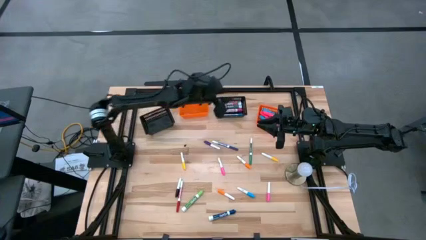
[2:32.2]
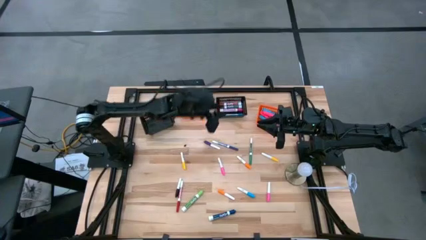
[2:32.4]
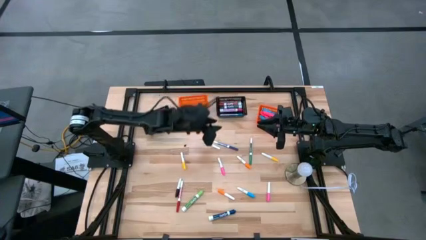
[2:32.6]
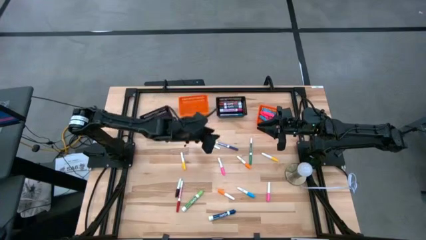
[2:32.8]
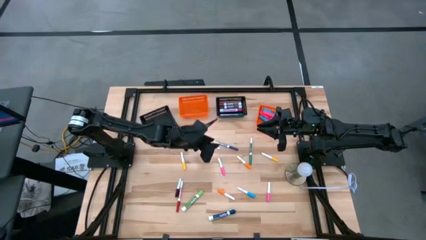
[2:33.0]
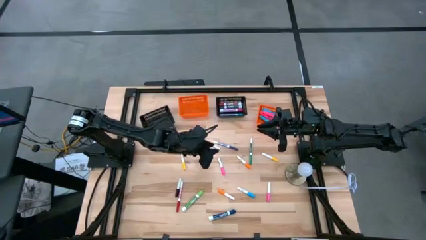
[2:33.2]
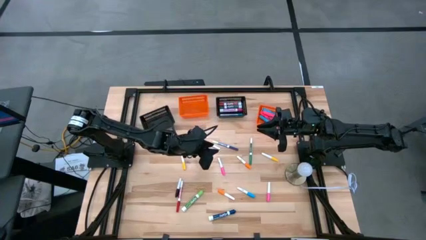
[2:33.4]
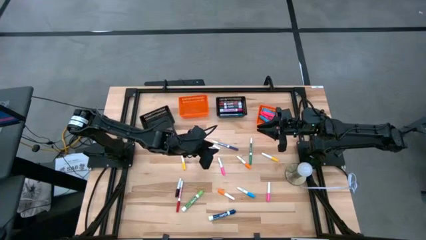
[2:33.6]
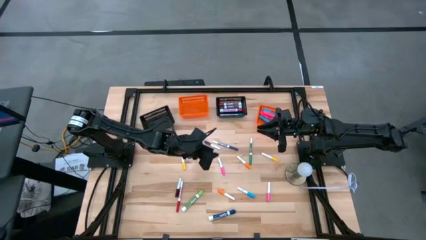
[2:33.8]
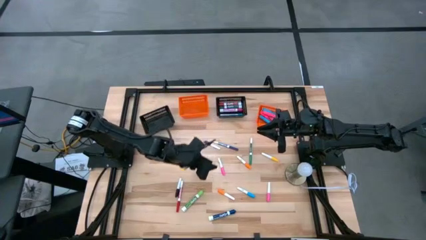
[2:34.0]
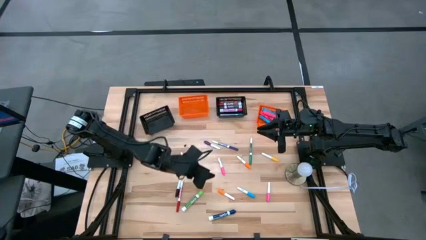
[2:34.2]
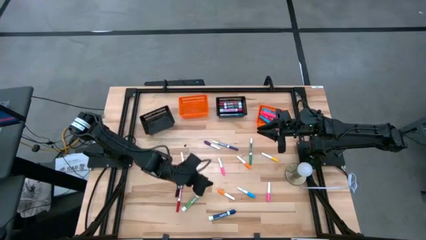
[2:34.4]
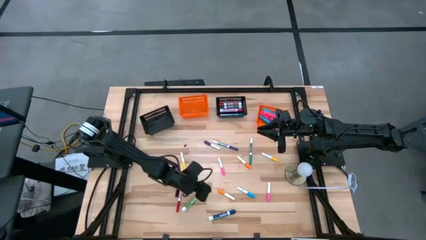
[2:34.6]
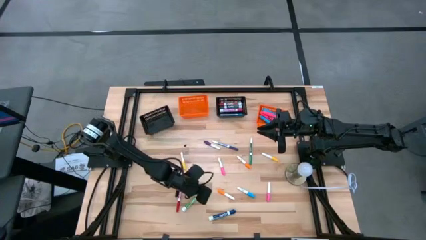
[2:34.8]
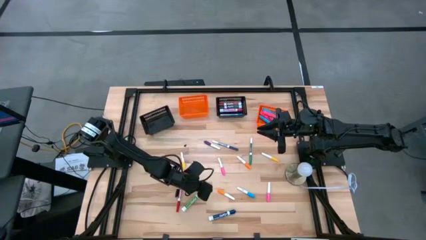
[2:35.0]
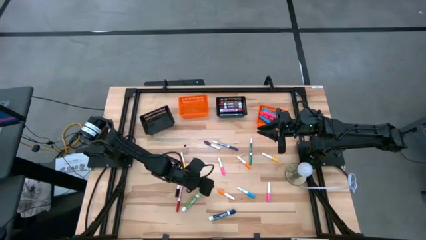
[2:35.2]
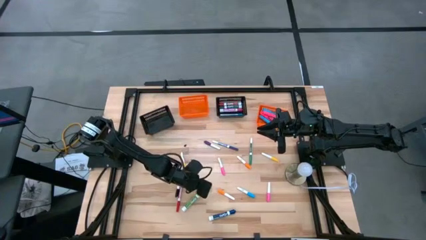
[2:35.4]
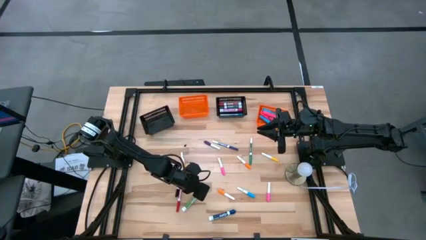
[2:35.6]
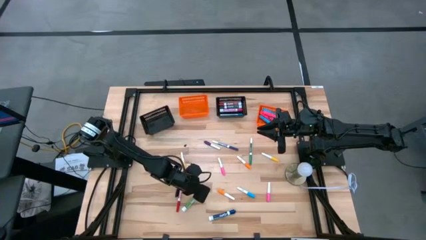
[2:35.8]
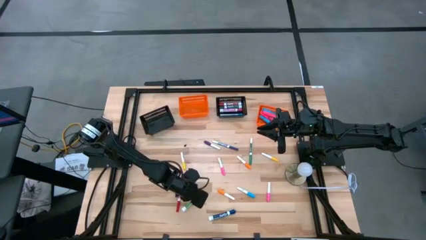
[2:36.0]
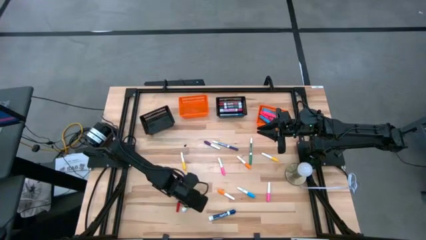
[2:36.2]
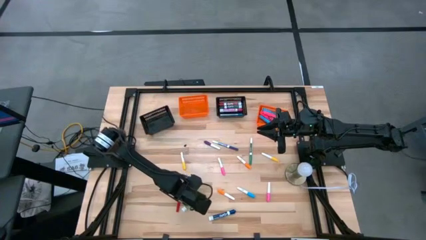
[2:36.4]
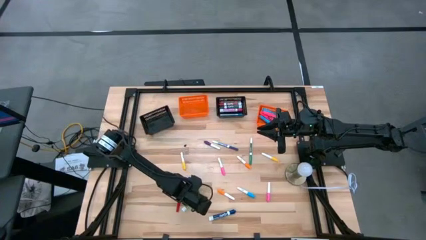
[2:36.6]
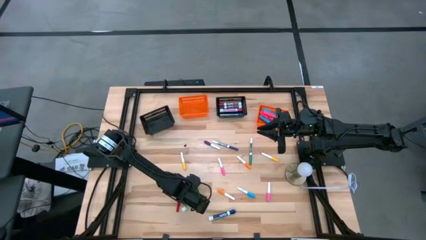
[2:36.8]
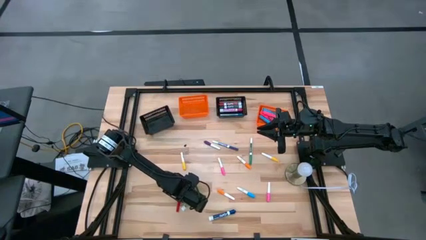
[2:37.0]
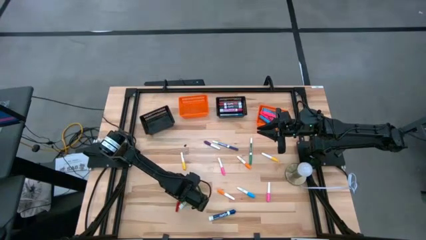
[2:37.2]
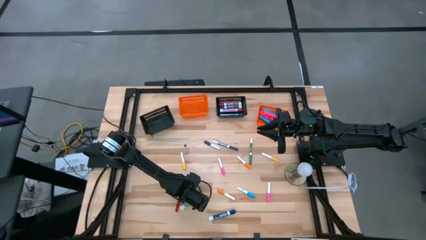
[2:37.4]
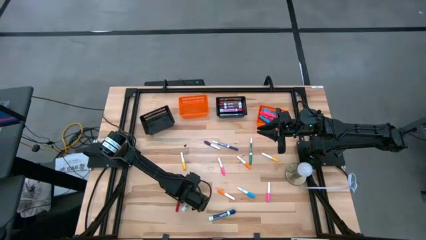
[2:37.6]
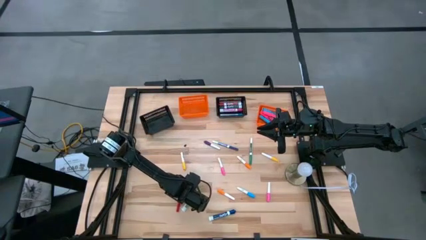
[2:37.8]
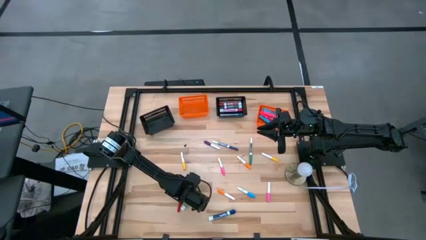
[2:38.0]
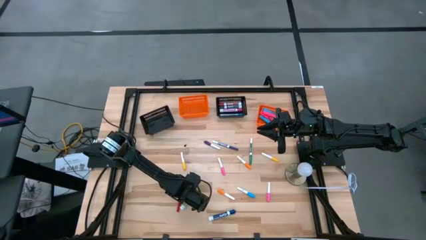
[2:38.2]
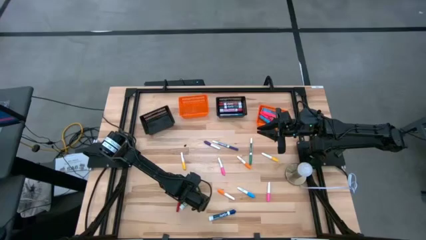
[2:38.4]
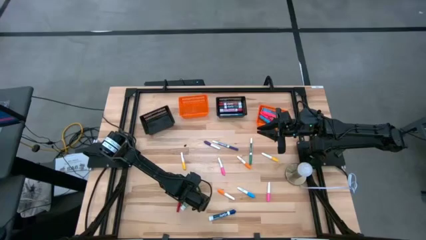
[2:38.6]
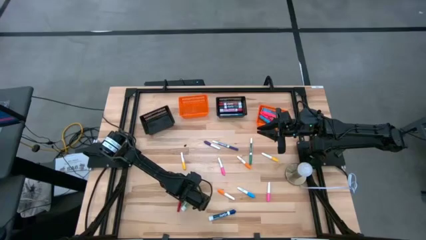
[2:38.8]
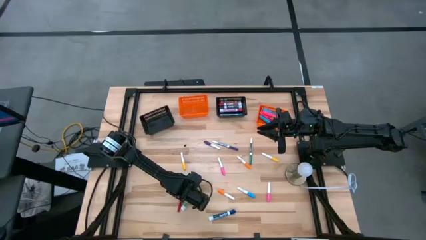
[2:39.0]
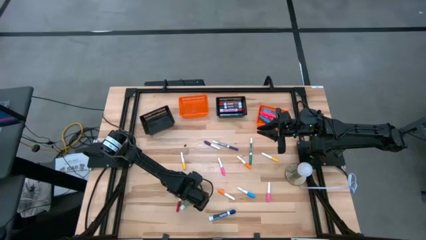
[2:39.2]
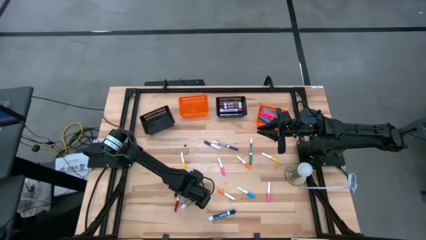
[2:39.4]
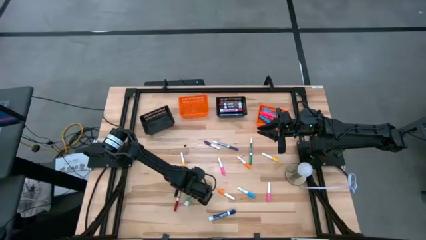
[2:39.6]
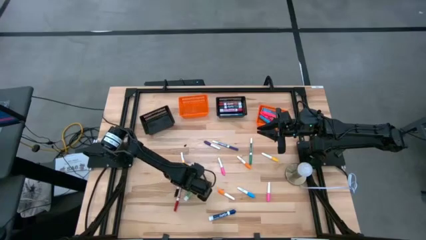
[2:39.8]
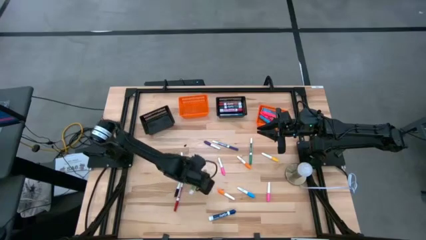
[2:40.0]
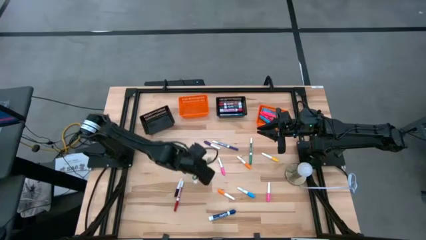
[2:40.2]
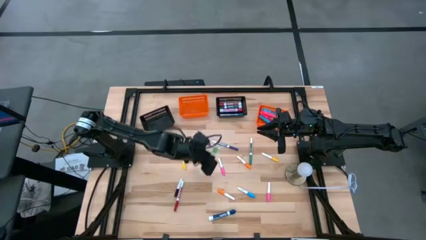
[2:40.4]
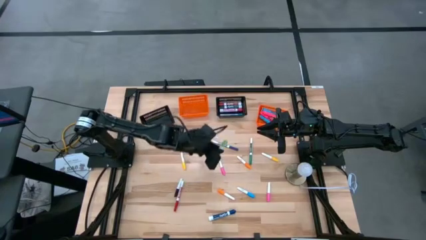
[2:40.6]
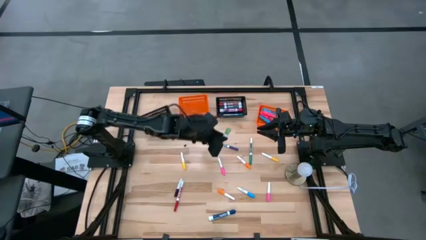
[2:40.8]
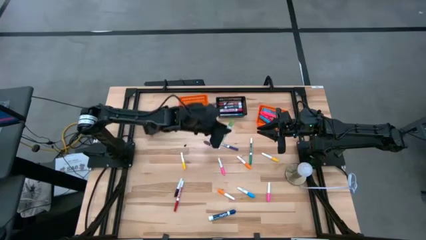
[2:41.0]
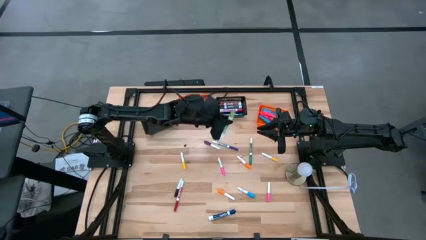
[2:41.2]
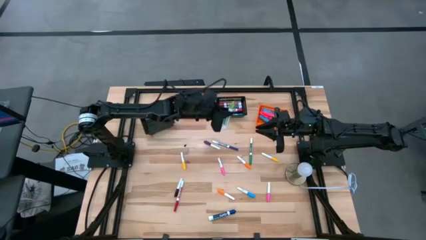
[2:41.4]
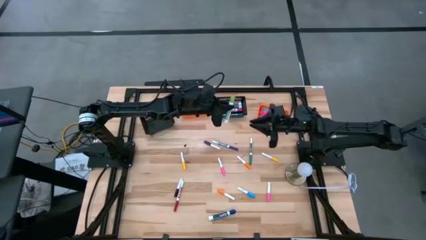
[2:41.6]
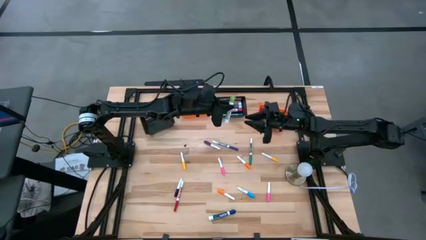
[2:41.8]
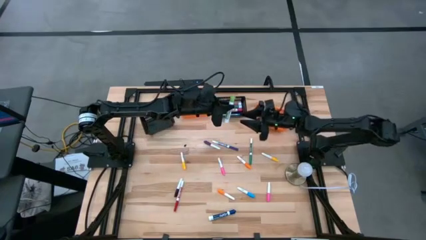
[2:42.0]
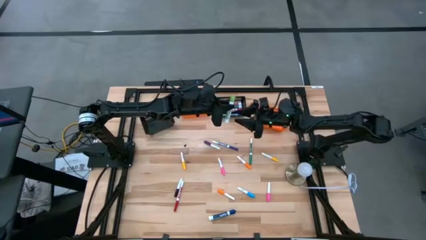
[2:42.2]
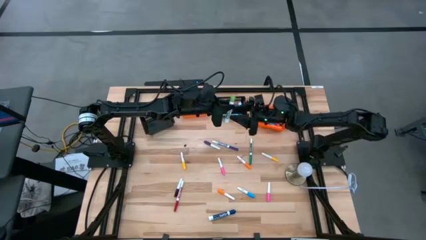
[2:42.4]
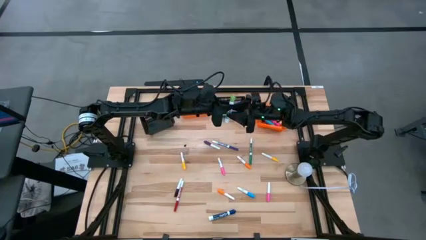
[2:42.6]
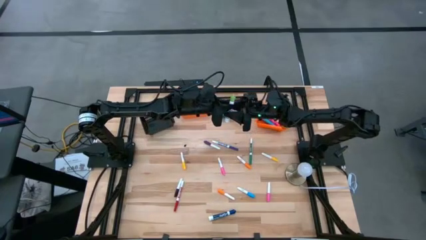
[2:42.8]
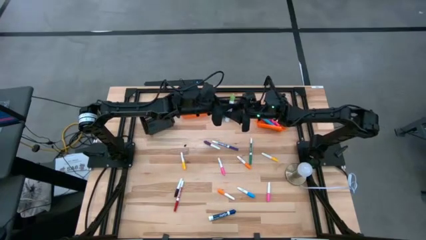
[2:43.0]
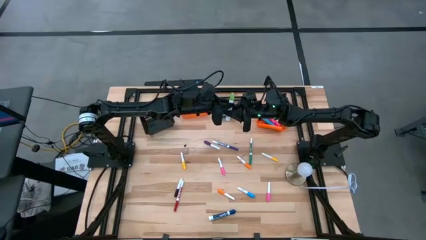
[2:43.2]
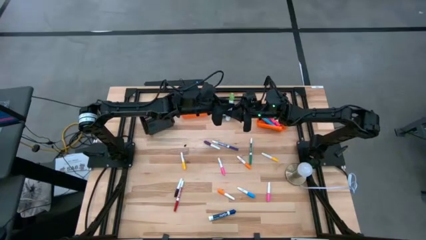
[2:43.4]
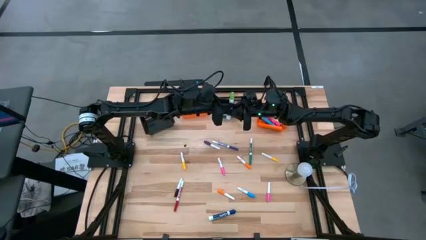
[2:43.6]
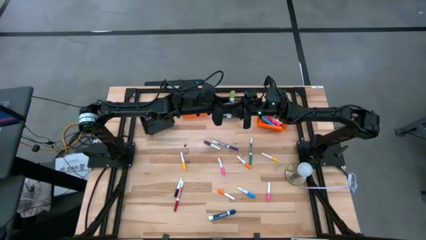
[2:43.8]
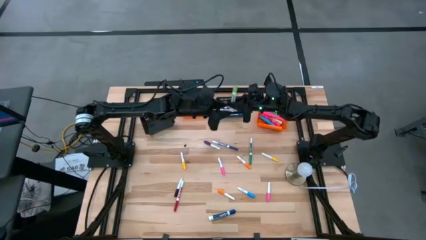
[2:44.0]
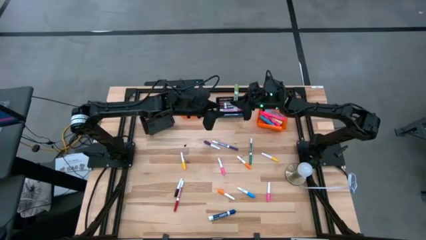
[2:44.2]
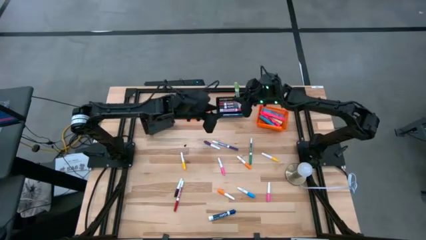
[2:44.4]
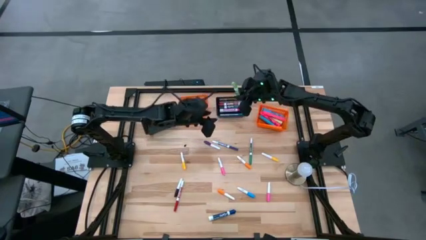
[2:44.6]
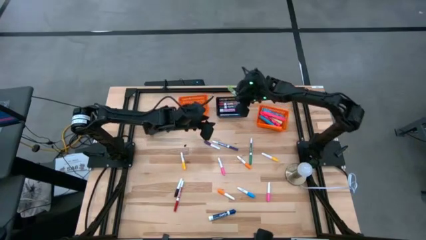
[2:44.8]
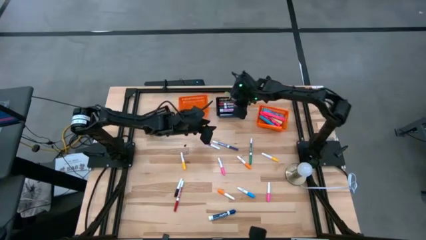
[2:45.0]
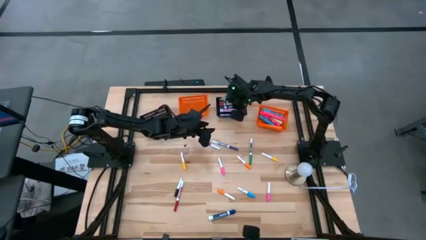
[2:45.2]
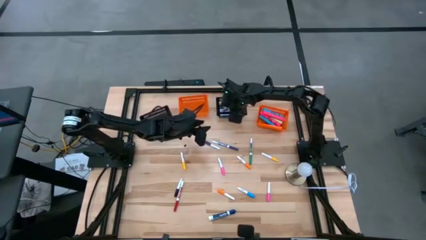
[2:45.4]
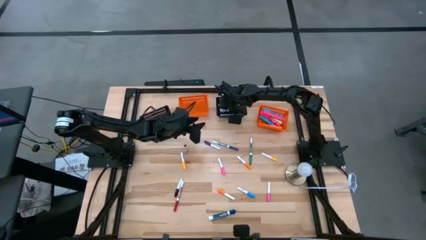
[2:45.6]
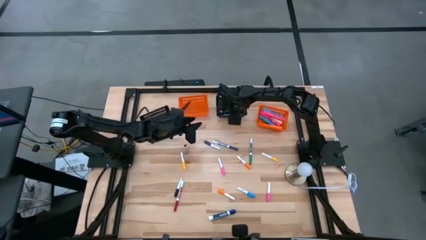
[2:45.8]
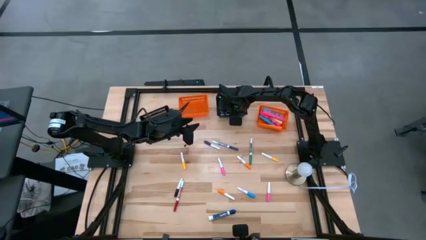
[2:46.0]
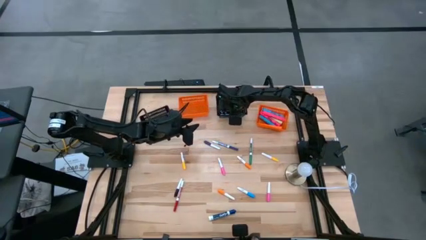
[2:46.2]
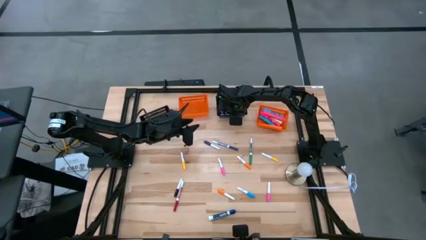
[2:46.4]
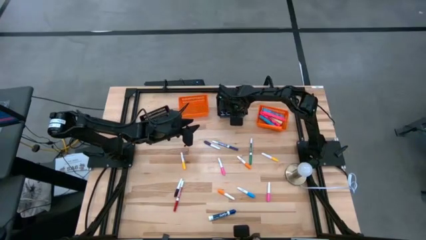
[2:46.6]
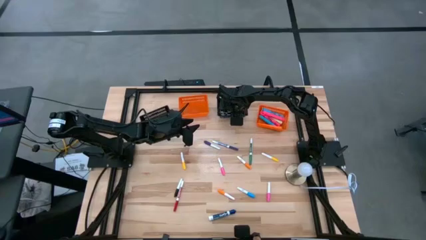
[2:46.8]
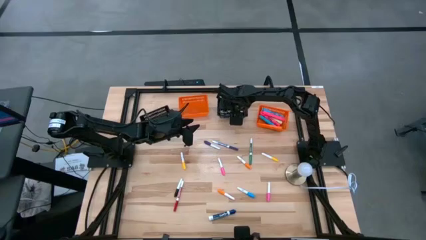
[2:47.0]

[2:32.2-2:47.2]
Task: Pick & Place Markers
Put the white light green marker into the middle black bin

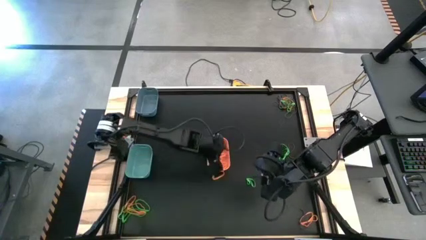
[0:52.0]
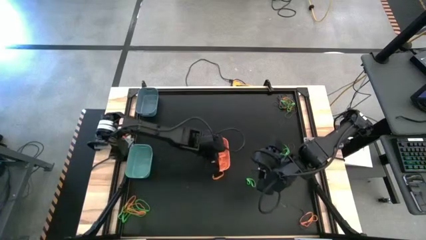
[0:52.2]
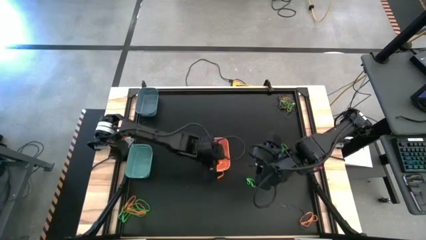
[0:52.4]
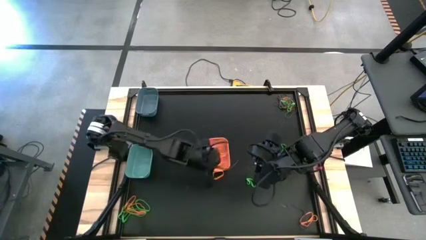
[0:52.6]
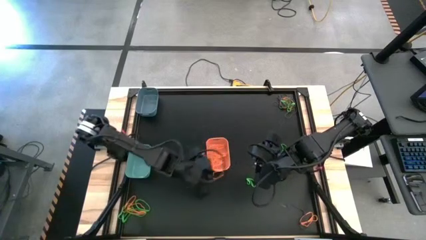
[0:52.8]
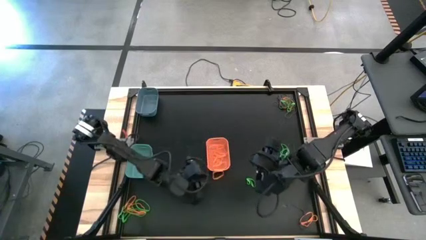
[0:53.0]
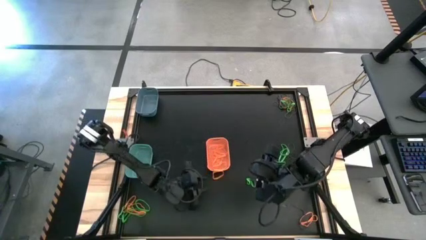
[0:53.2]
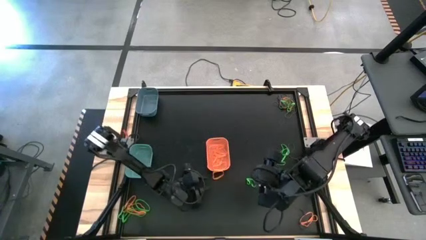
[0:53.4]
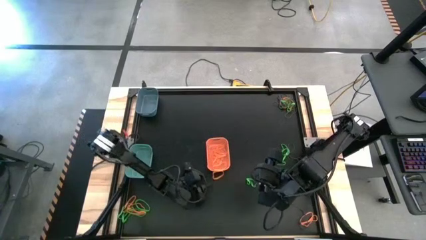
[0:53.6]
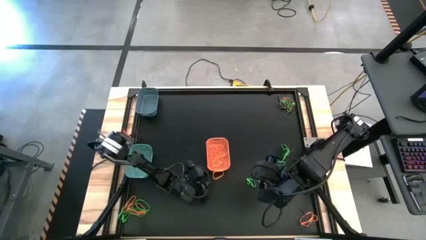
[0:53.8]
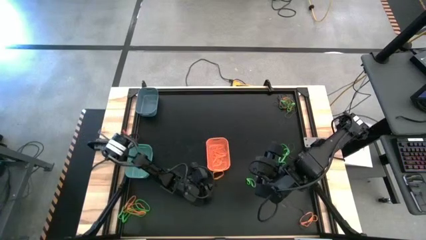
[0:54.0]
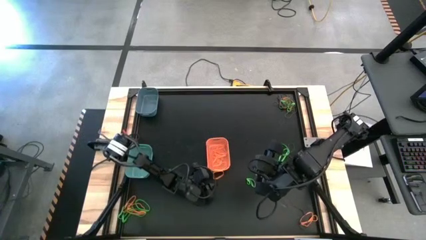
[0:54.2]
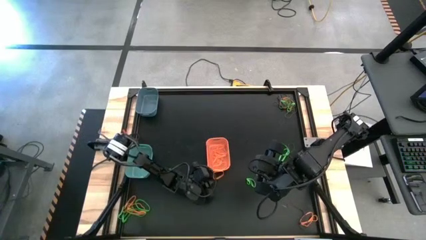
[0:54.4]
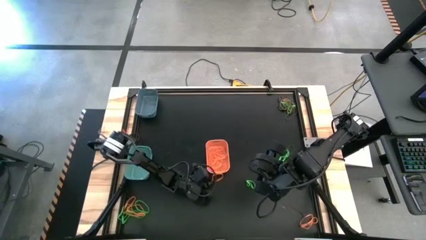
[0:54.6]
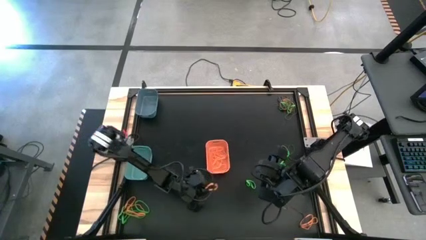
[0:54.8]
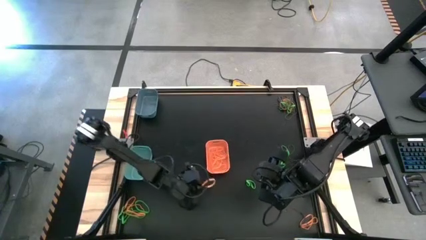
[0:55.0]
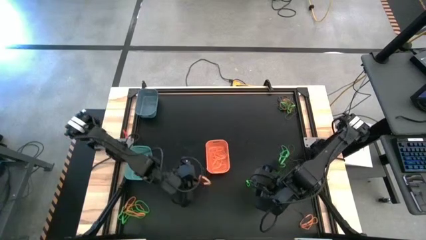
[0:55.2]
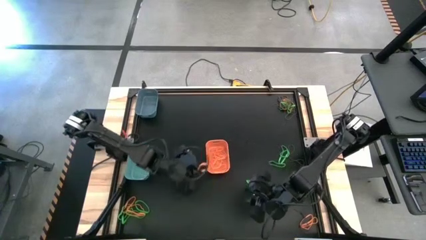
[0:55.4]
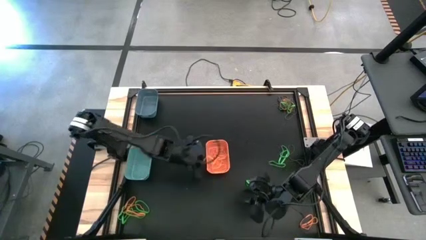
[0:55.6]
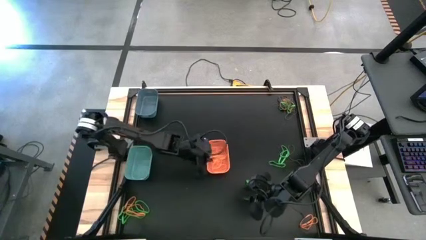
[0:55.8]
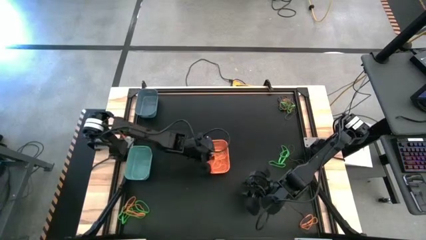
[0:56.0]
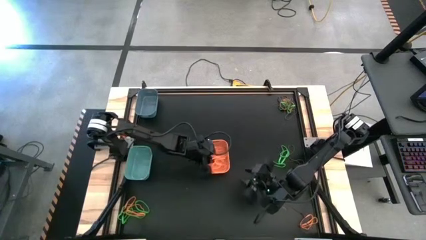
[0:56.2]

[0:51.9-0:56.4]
Task: Sort rubber bands into baskets
Put the orange rubber band into the orange bin
